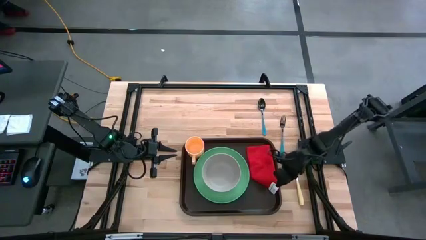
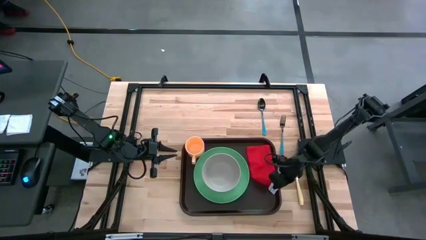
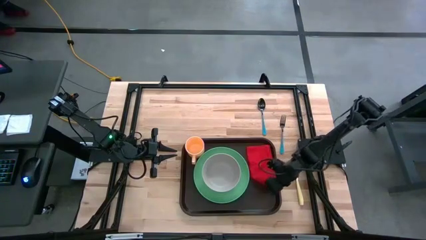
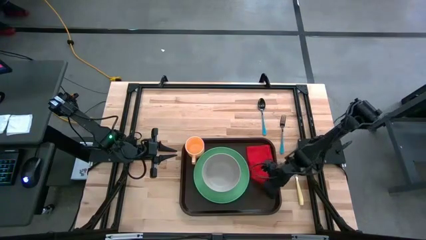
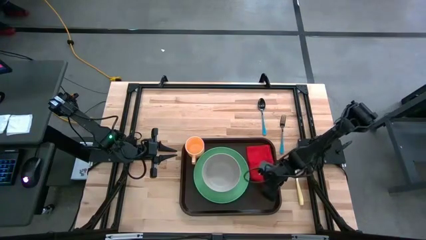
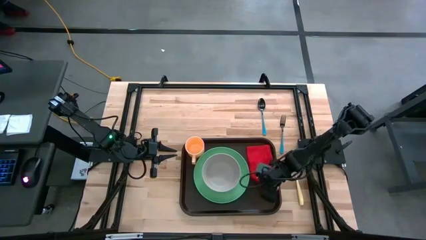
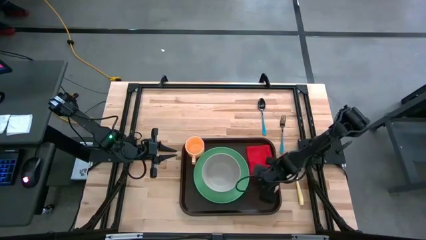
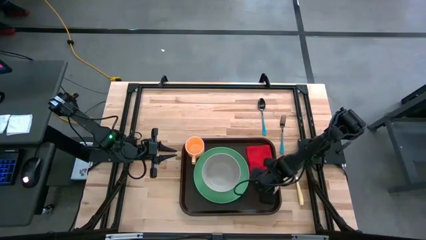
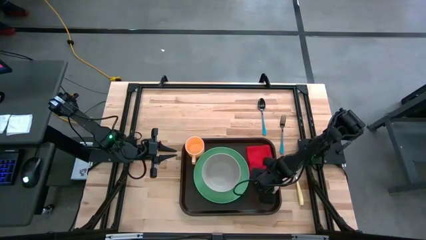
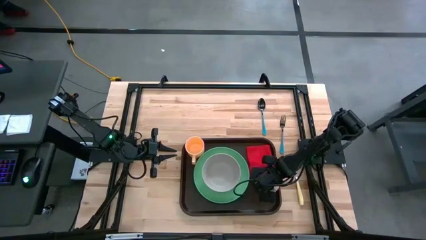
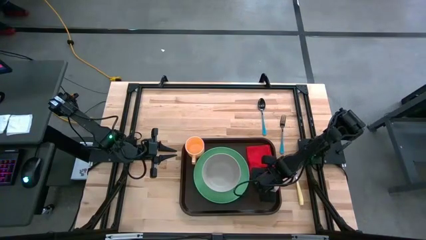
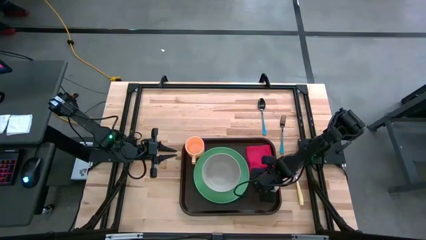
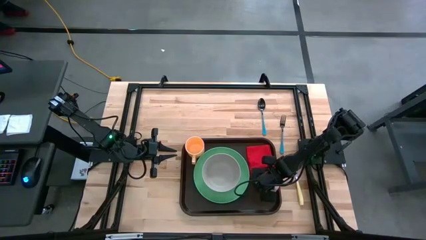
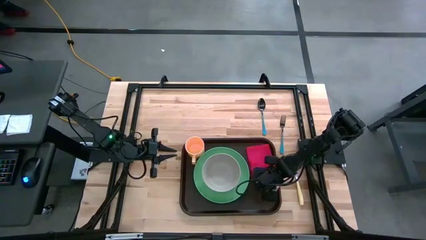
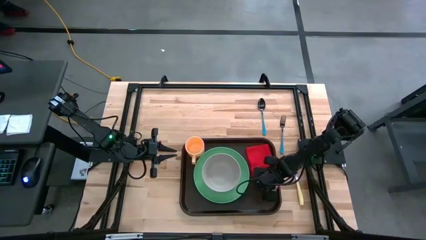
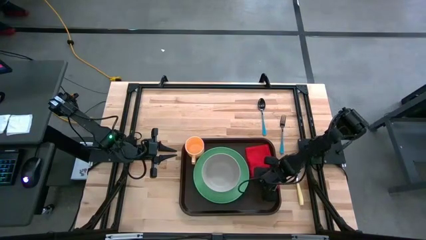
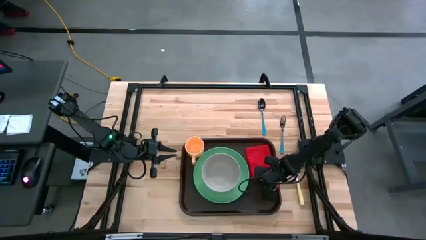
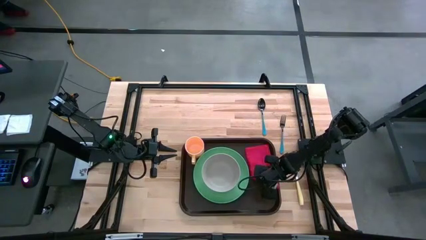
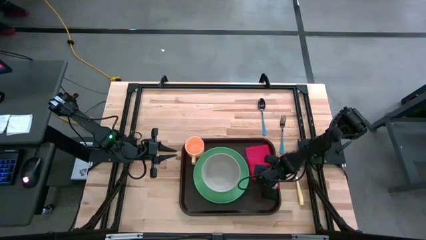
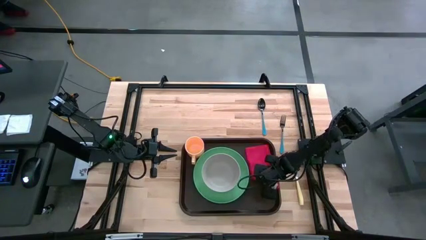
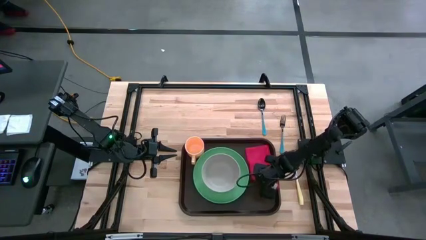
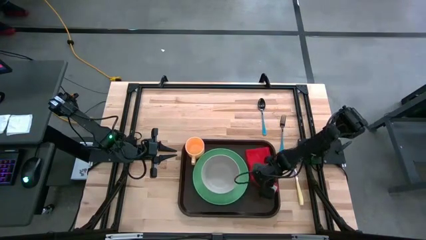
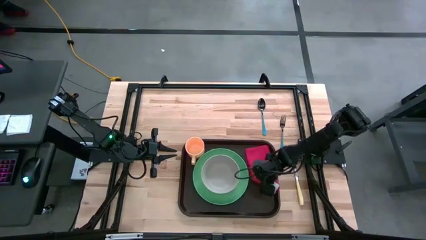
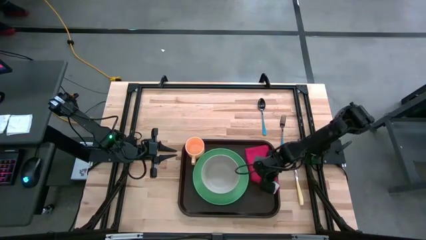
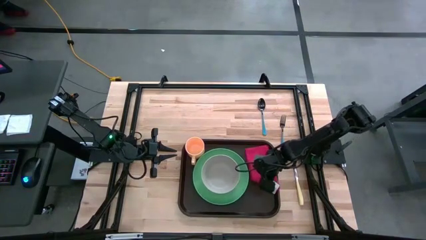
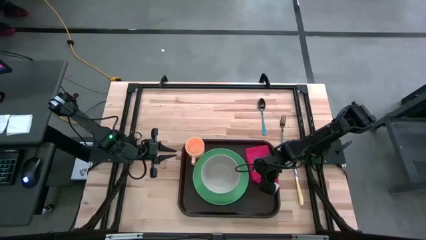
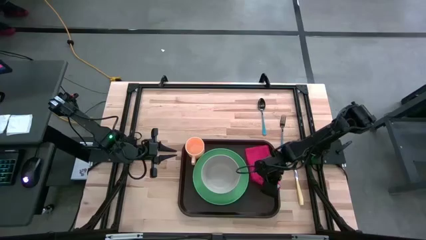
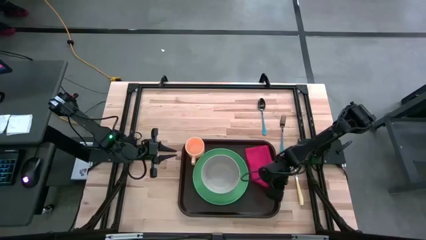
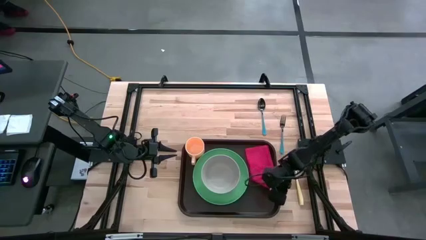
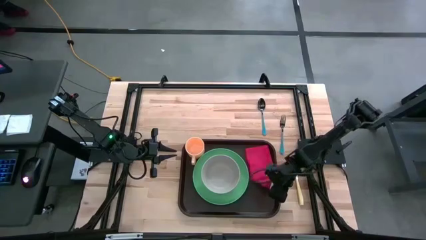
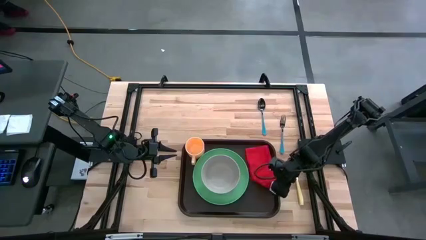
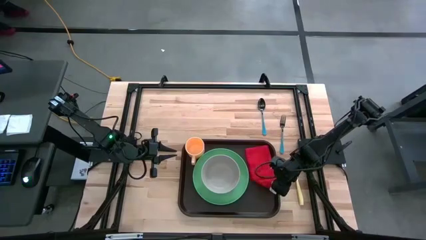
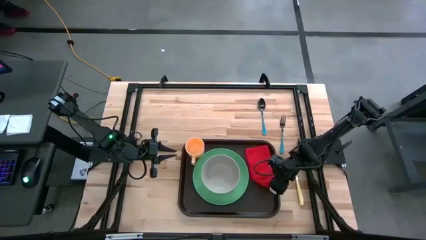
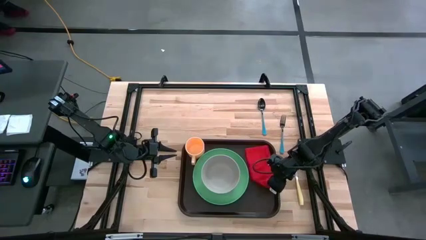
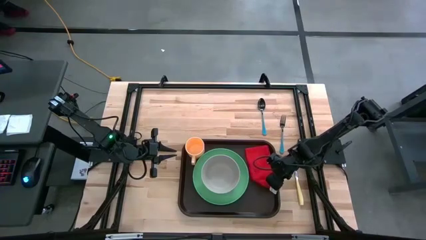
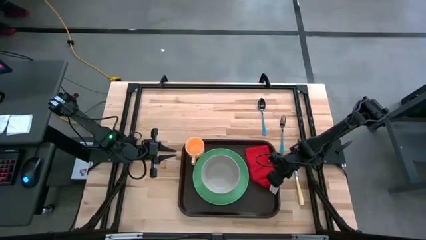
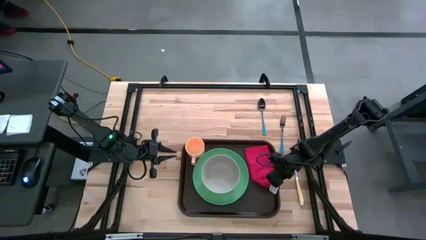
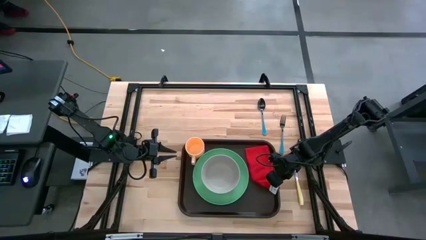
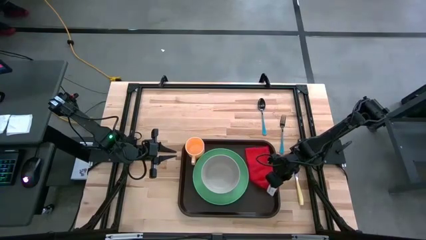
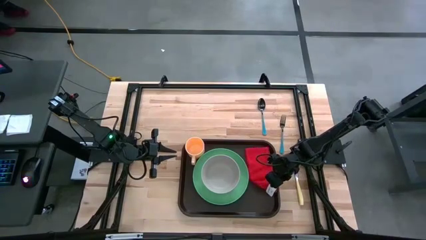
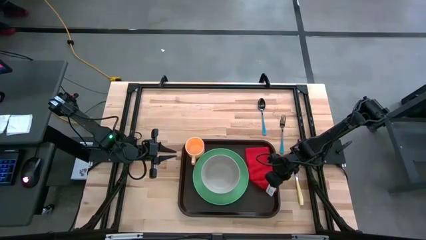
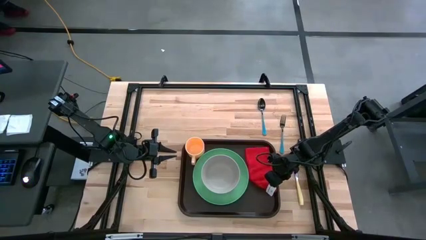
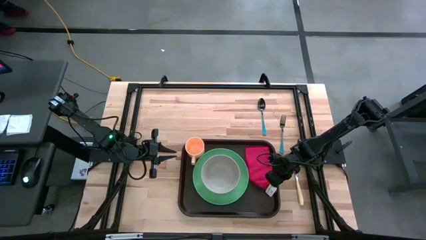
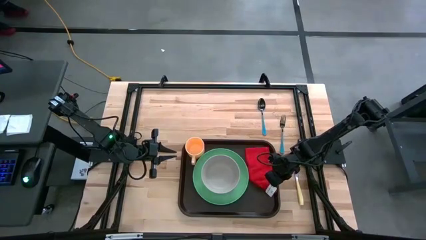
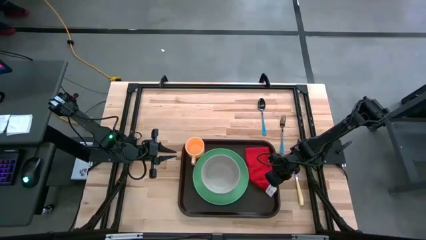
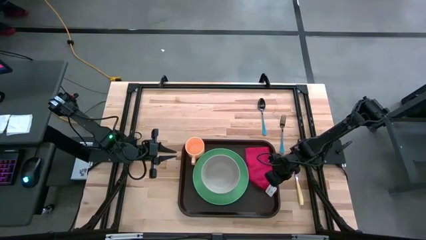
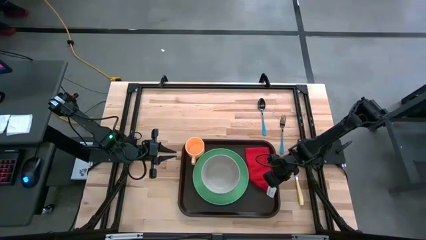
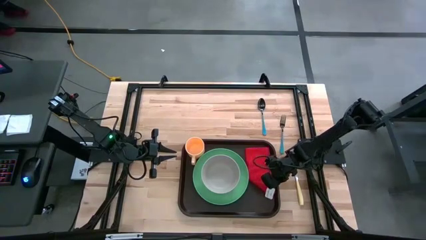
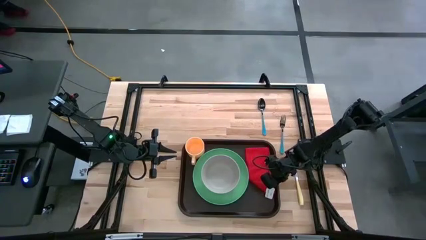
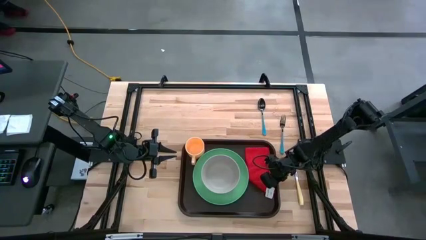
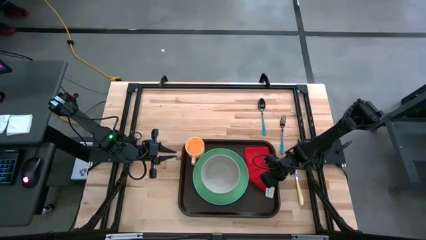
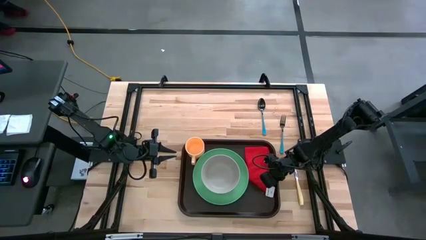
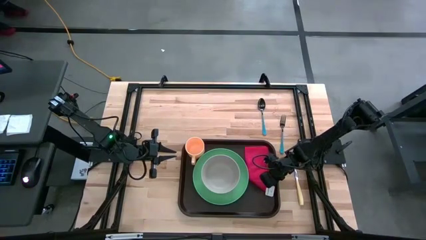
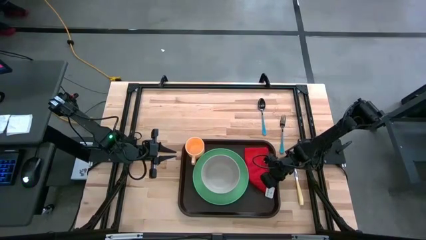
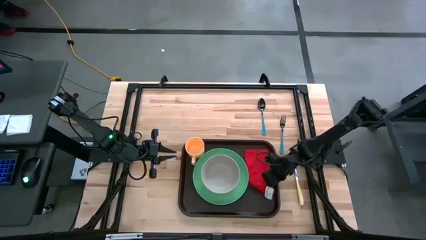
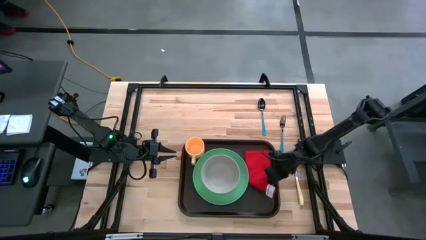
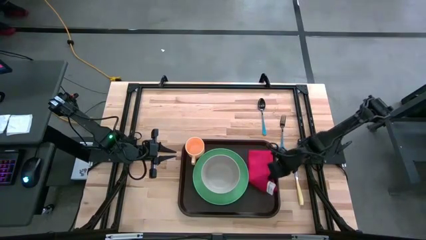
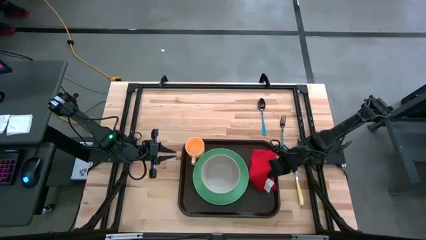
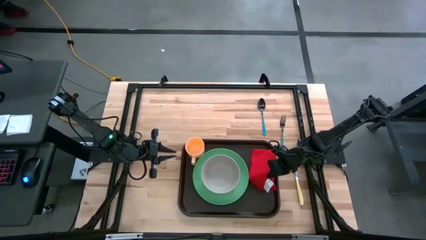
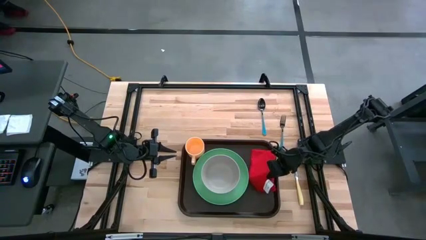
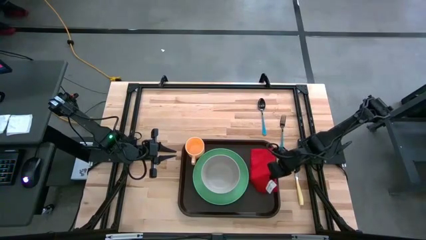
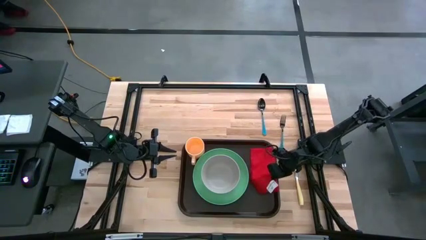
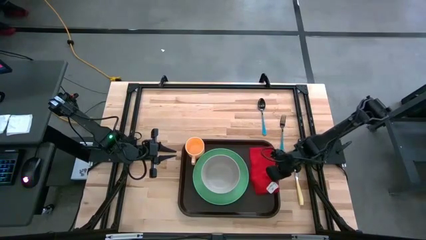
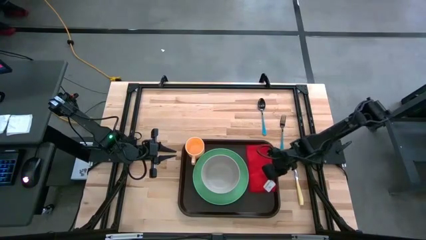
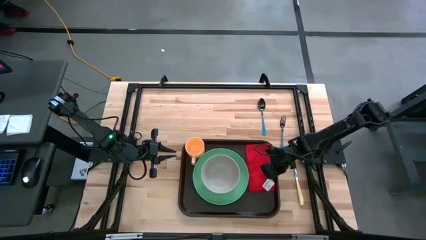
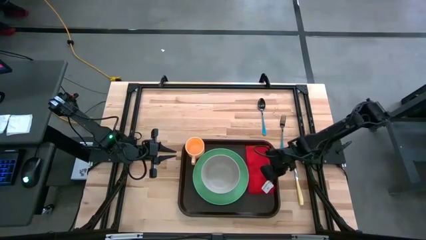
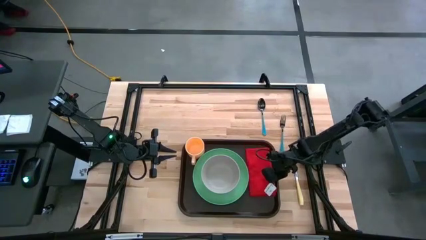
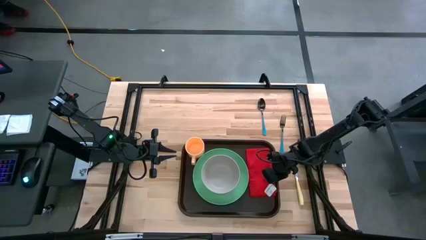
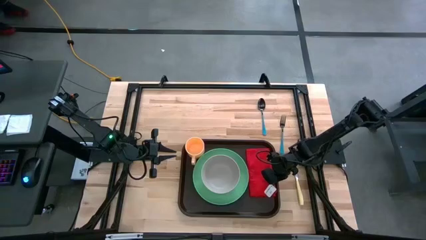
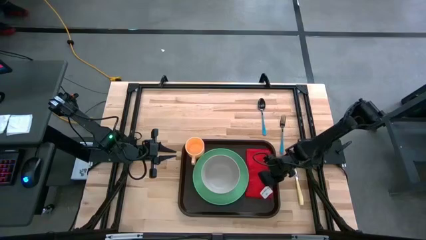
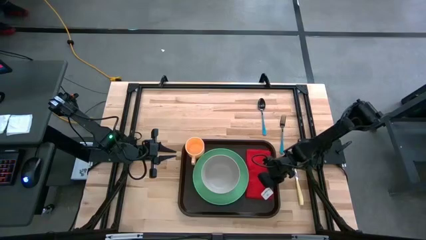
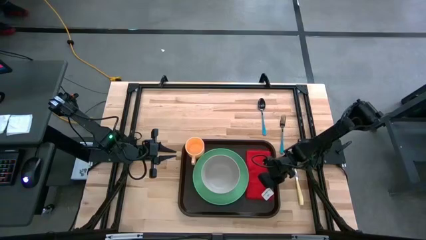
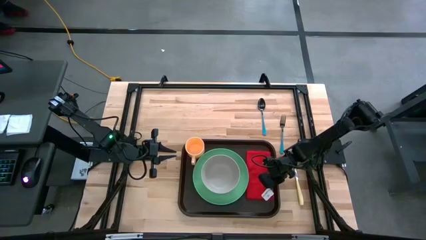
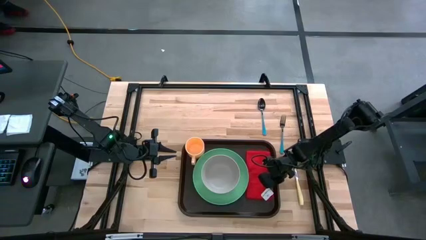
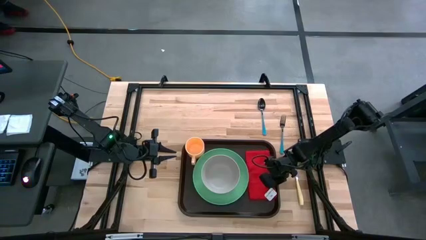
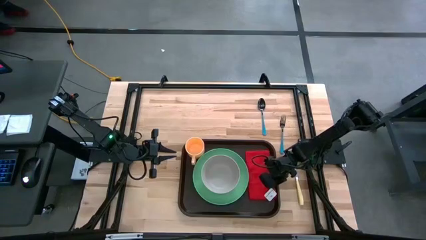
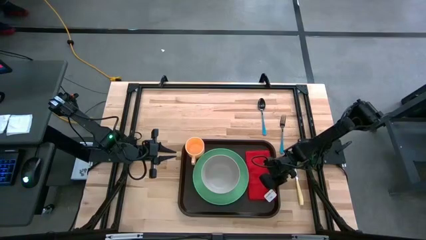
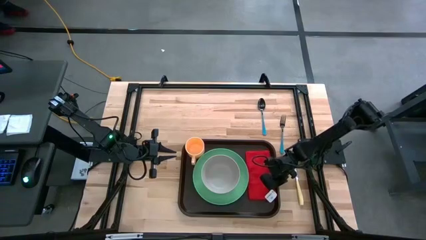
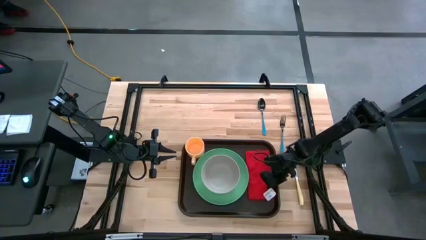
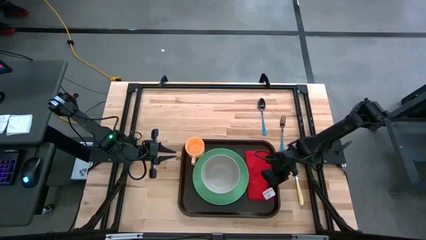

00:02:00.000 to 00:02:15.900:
Task: Set up tray
Put the red table napkin on the black tray to the right of the green plate
